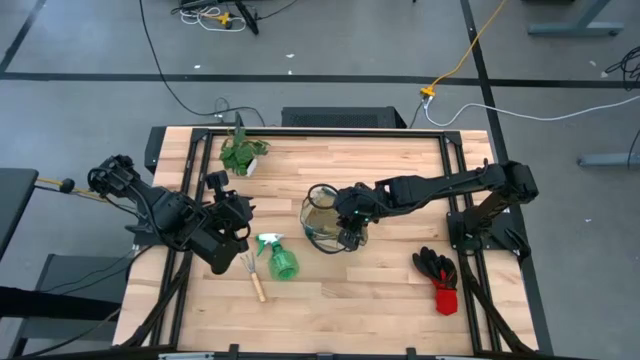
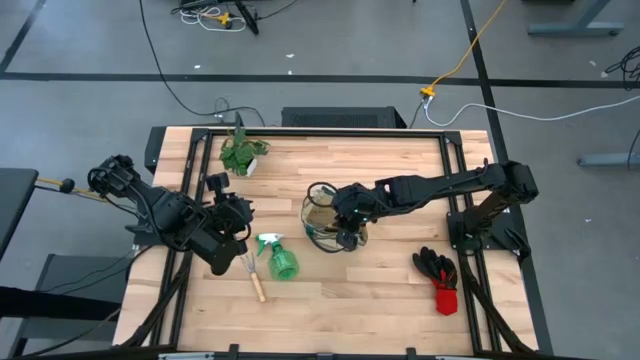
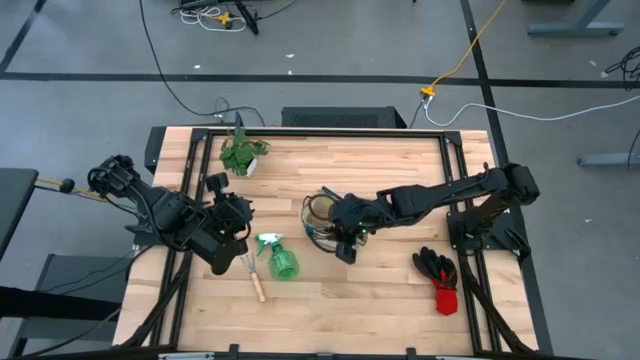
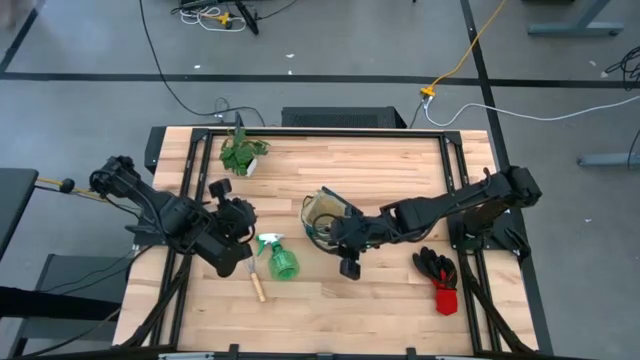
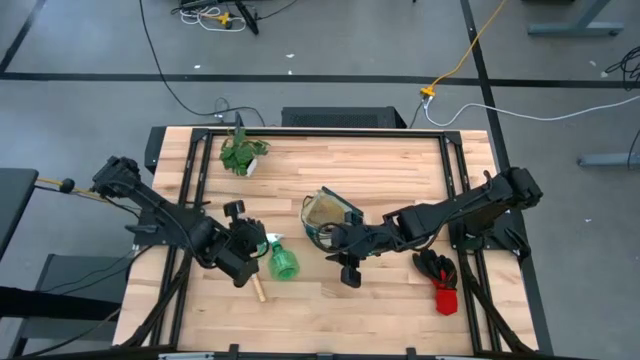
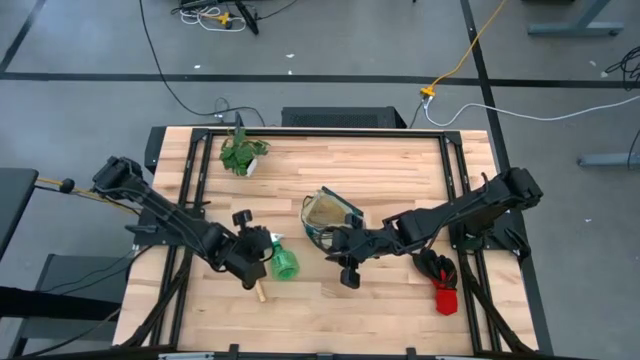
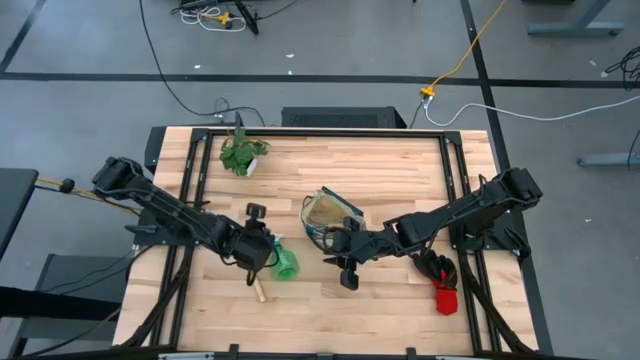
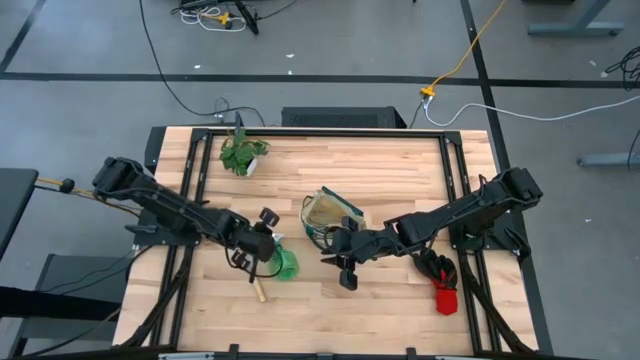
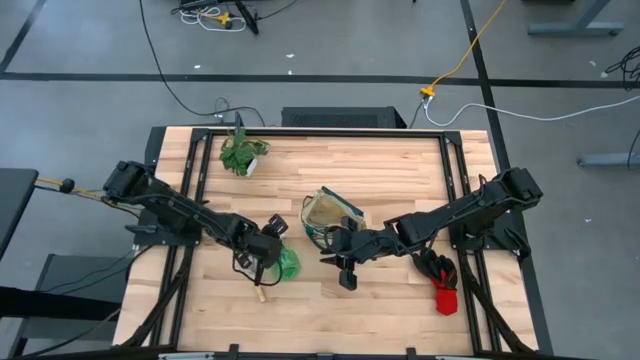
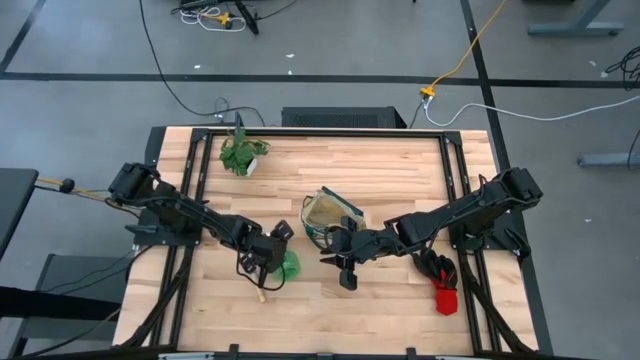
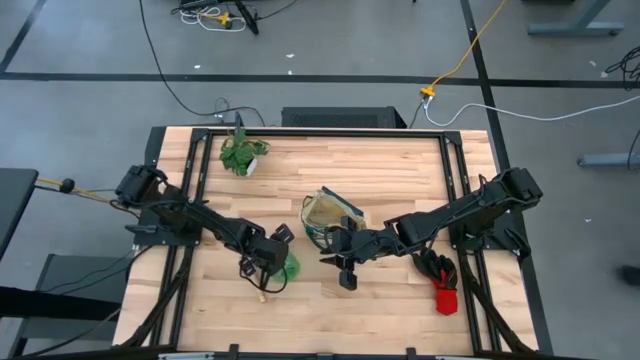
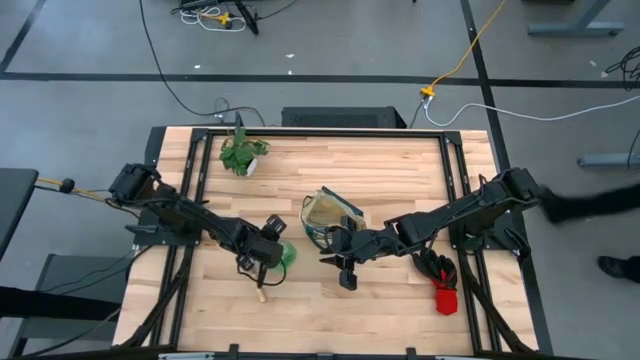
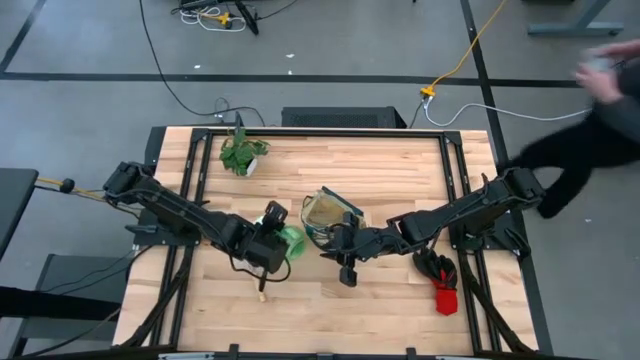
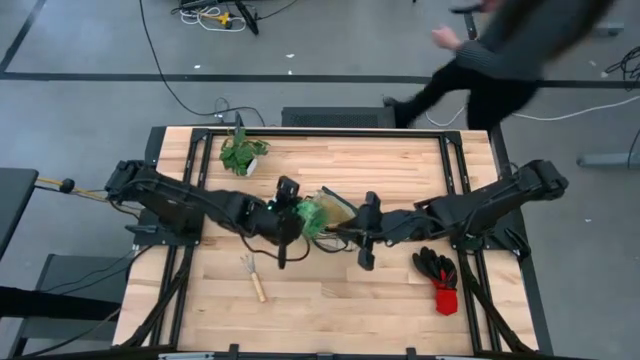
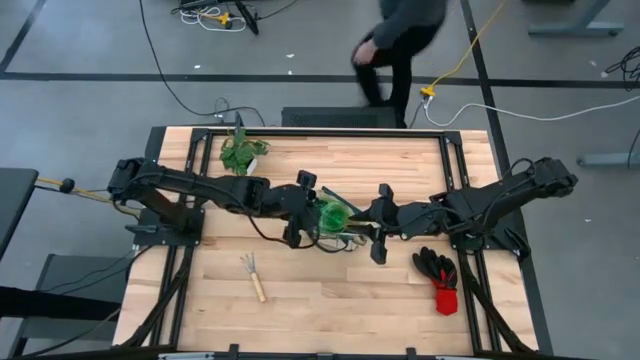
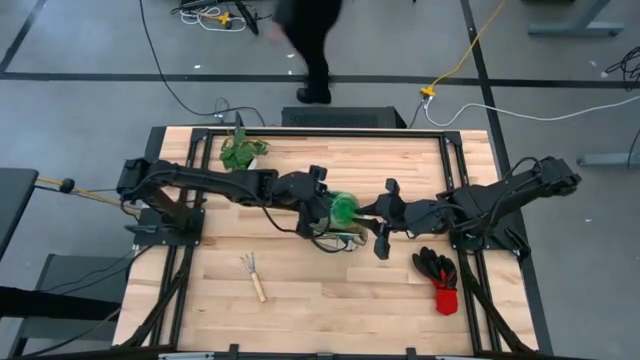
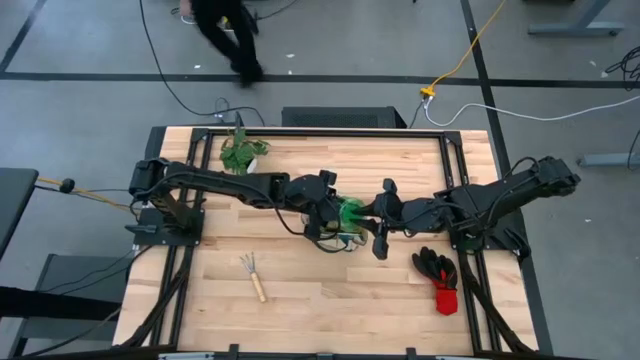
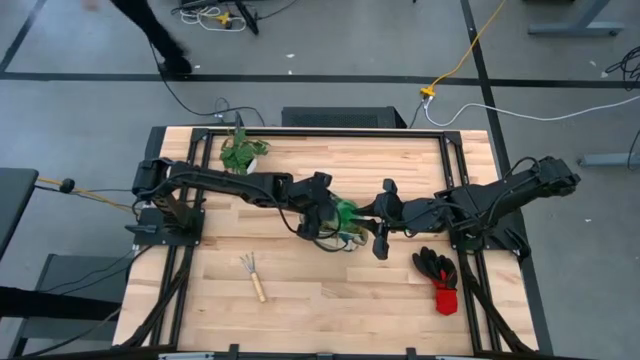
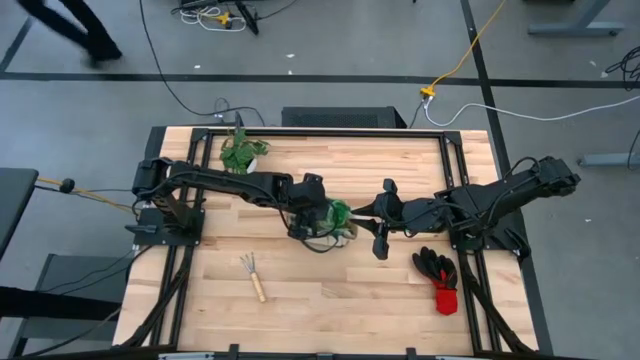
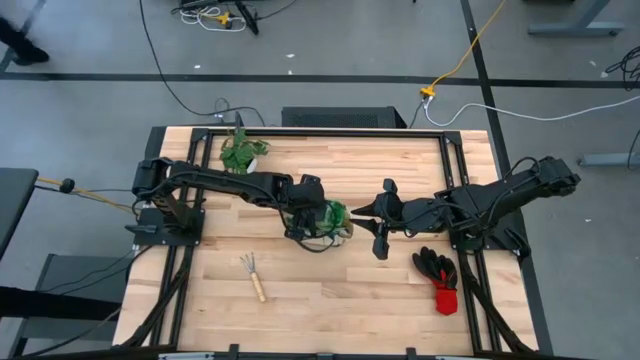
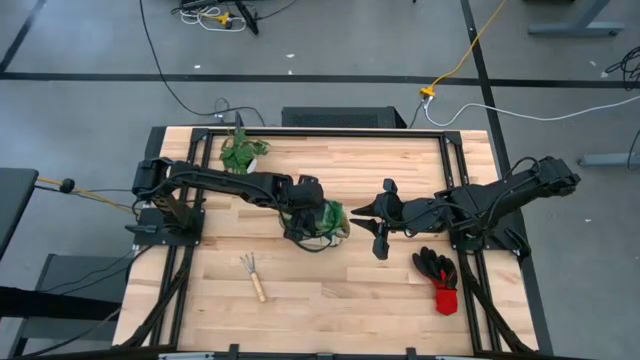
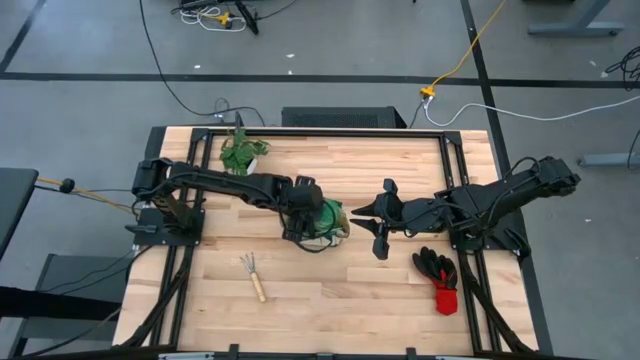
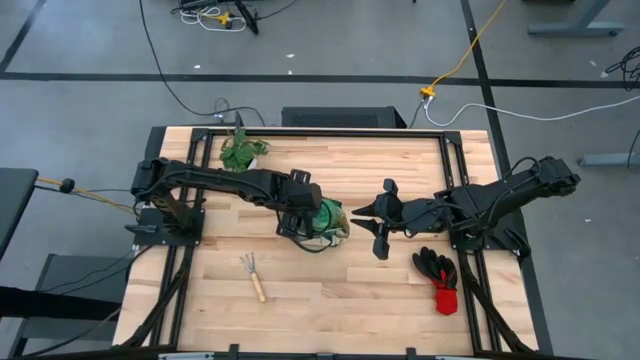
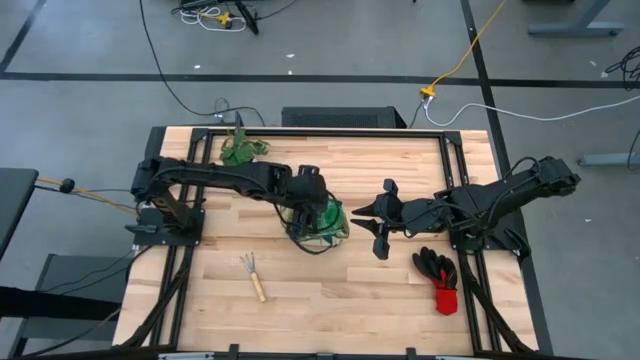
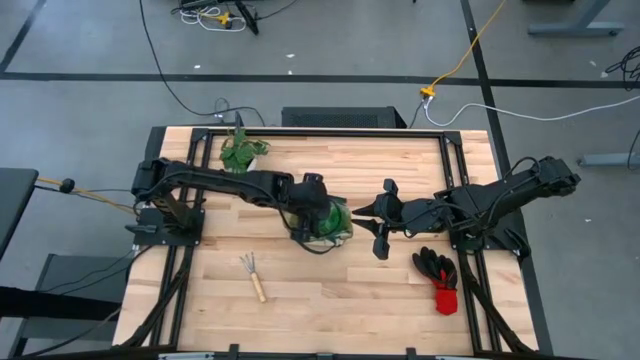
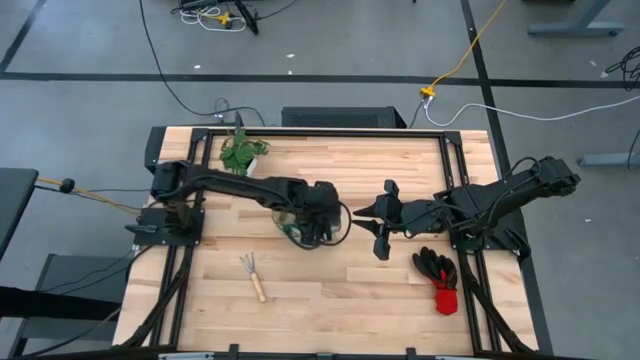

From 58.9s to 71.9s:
Task: Pick & Place Garden tools in Gardening bag
Put the green spray bottle into the white gardening bag

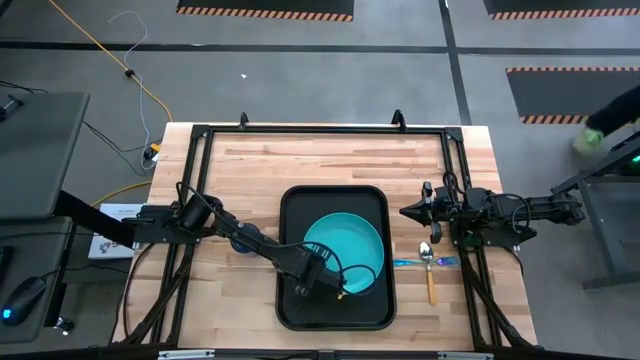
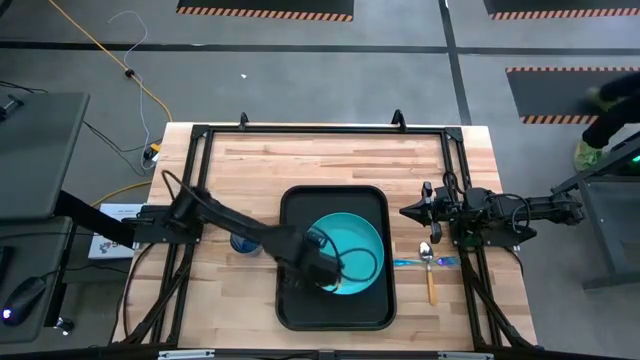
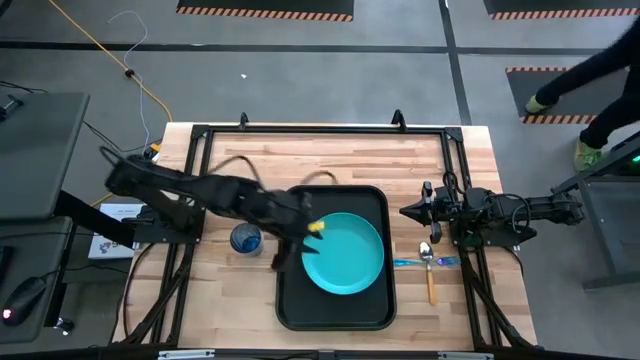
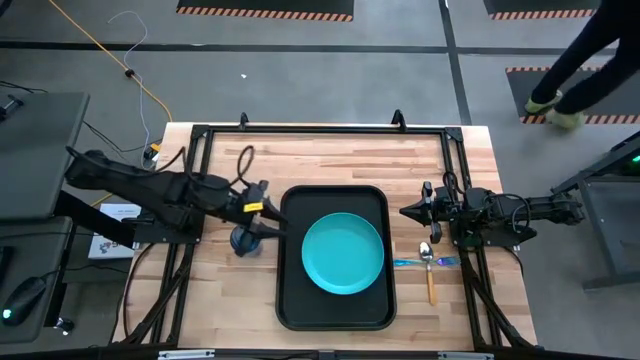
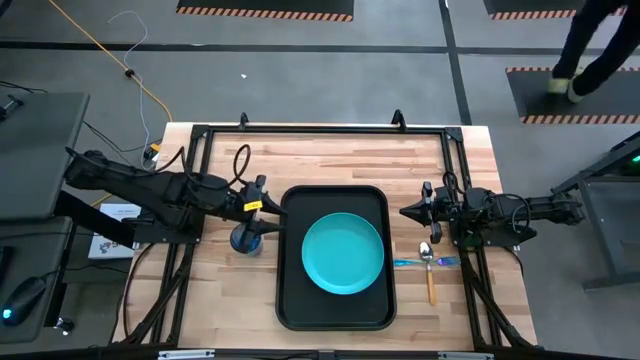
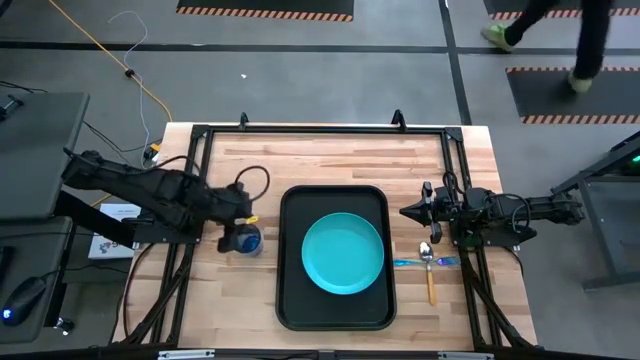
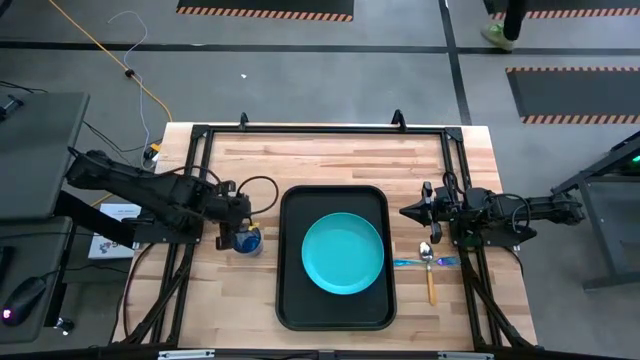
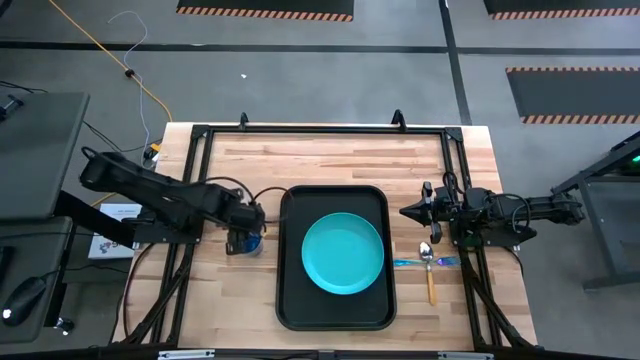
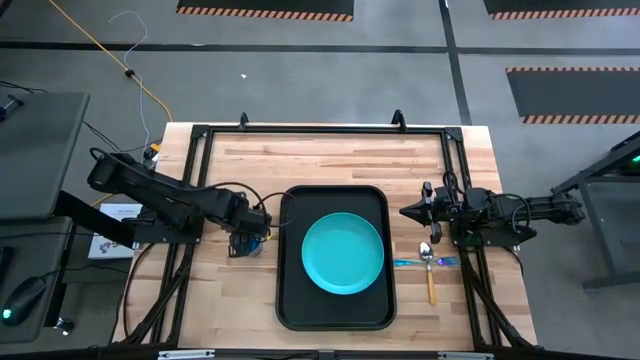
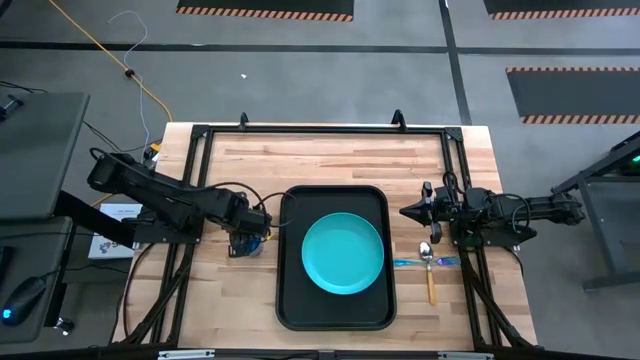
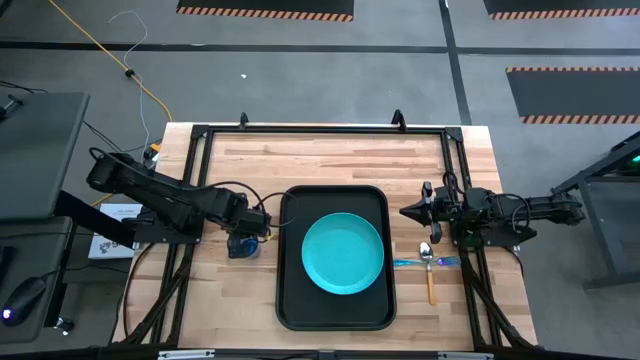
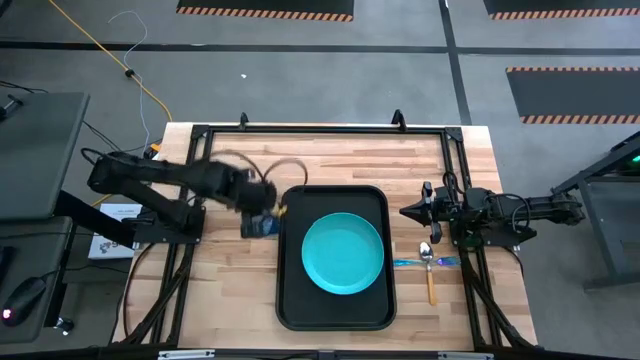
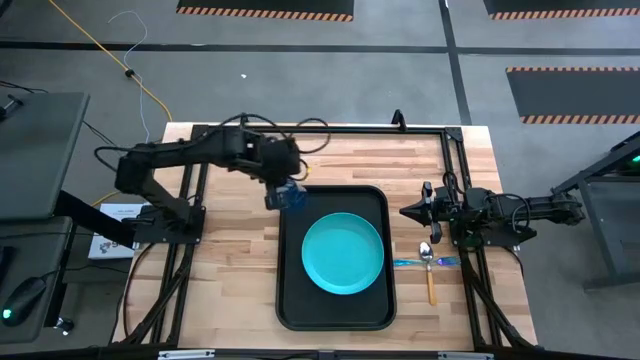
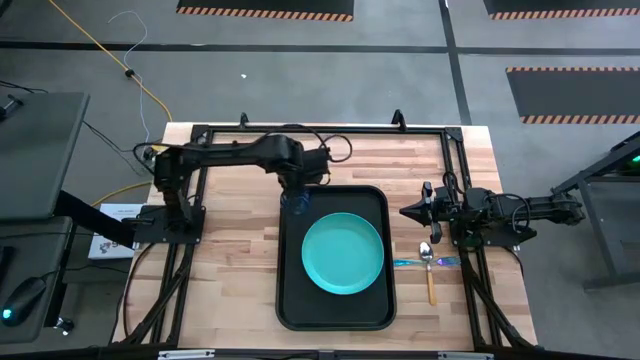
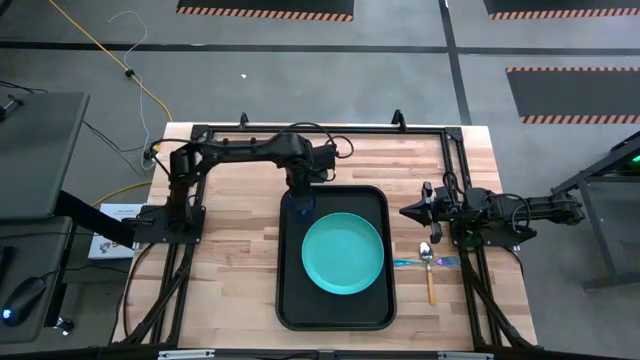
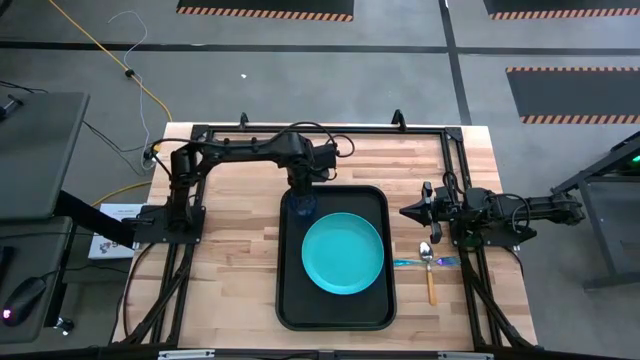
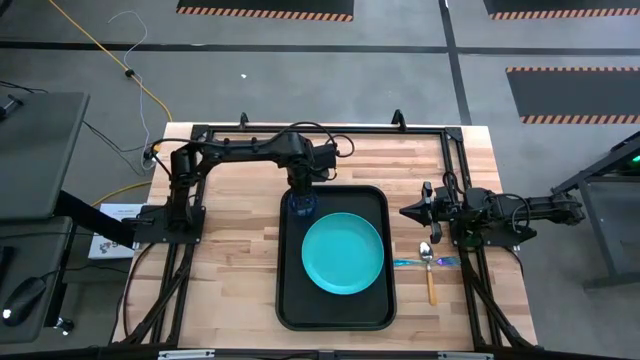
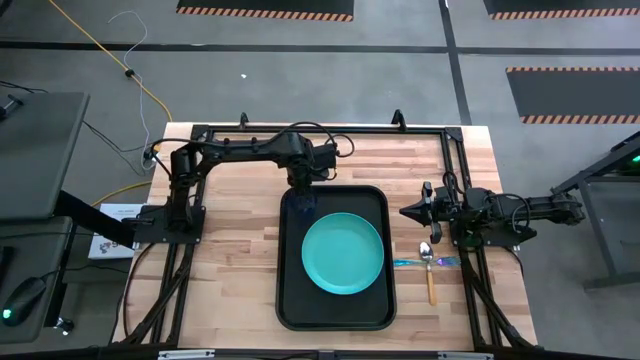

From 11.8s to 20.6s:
Task: Pick and place plate/cup/fork/spoon on tray
Put the blue cup in the black tray into the top left of the blue plate
